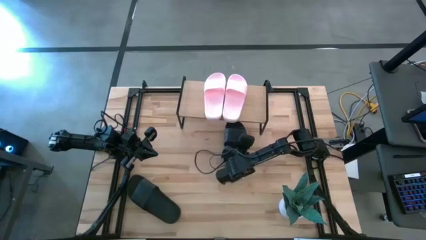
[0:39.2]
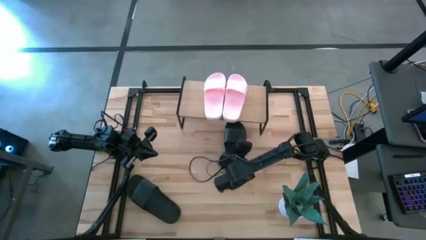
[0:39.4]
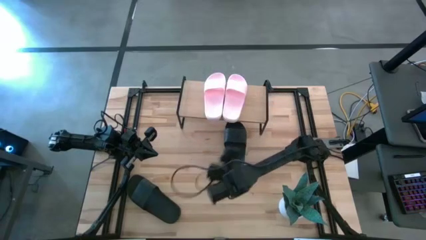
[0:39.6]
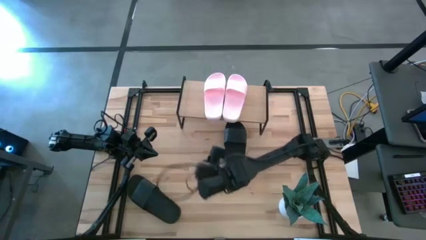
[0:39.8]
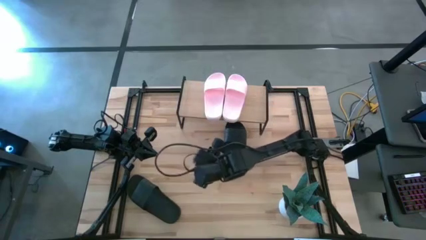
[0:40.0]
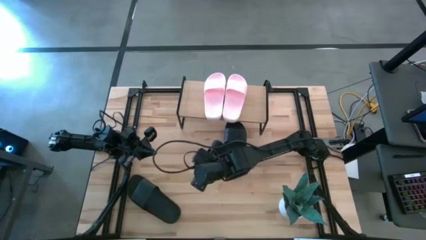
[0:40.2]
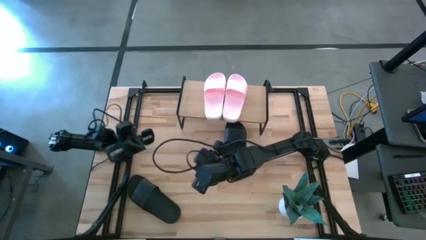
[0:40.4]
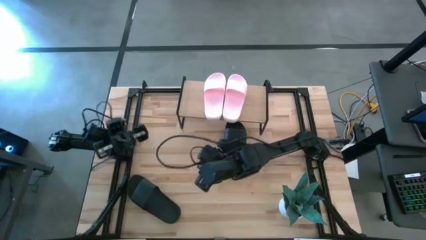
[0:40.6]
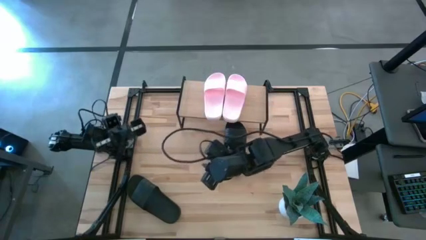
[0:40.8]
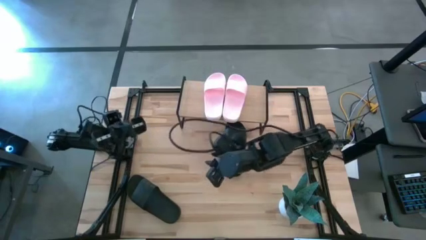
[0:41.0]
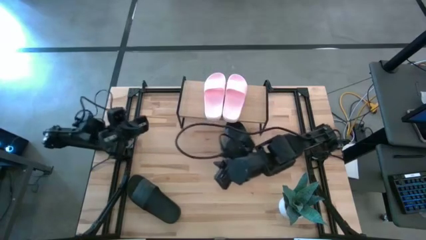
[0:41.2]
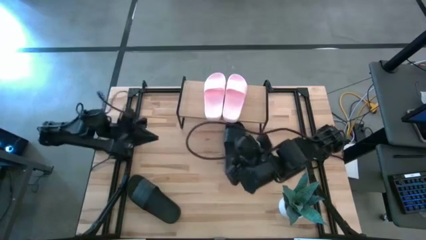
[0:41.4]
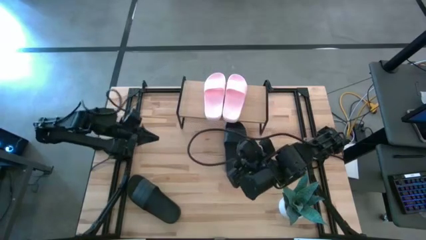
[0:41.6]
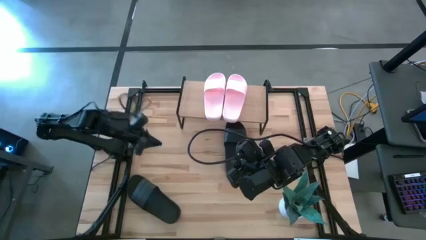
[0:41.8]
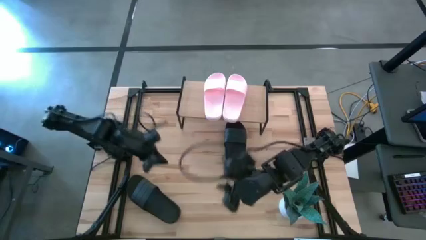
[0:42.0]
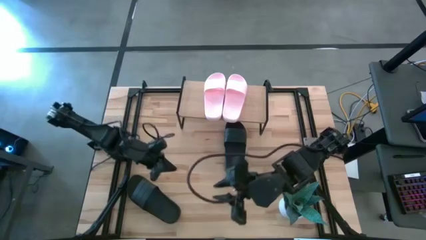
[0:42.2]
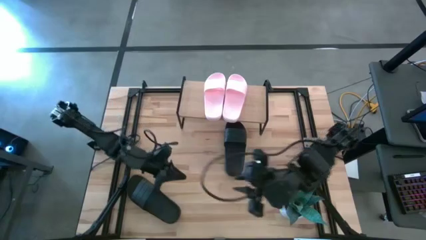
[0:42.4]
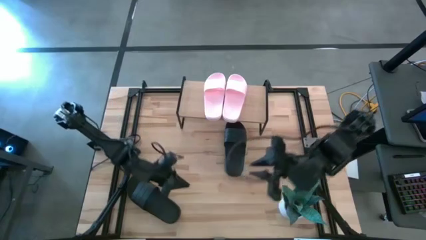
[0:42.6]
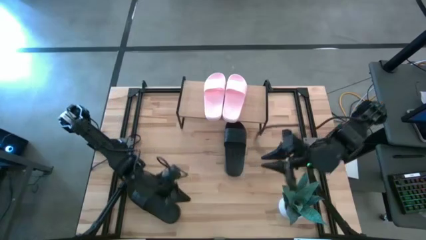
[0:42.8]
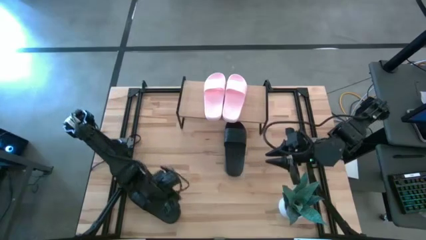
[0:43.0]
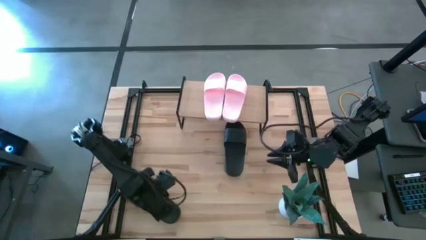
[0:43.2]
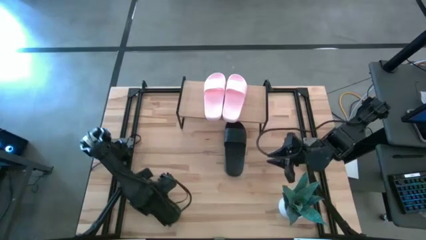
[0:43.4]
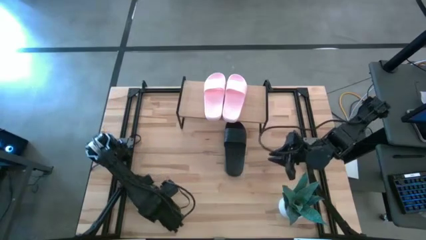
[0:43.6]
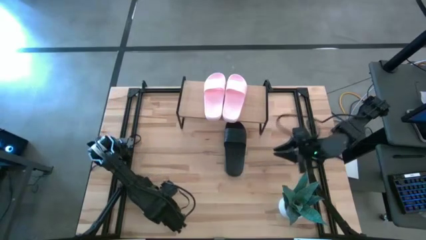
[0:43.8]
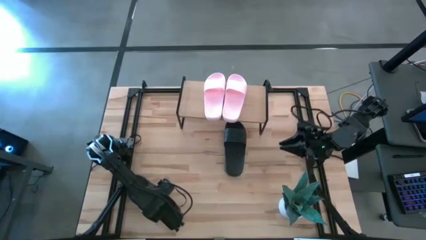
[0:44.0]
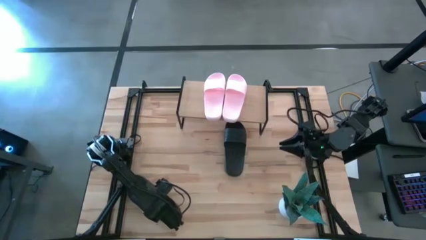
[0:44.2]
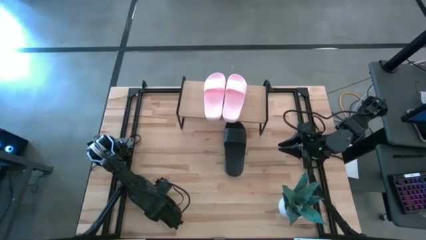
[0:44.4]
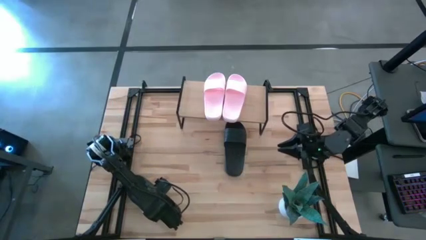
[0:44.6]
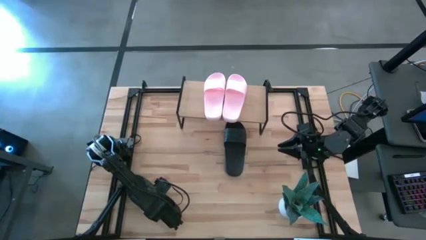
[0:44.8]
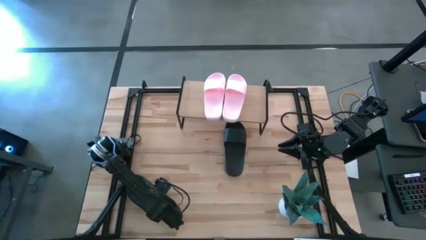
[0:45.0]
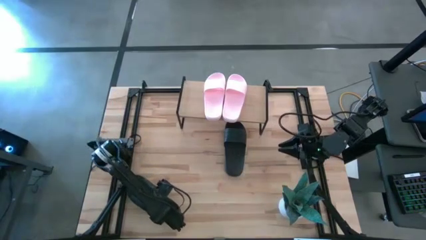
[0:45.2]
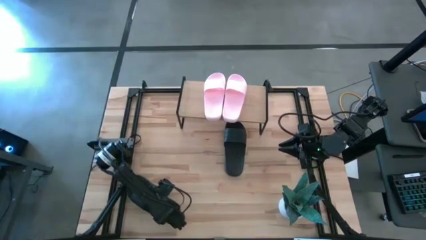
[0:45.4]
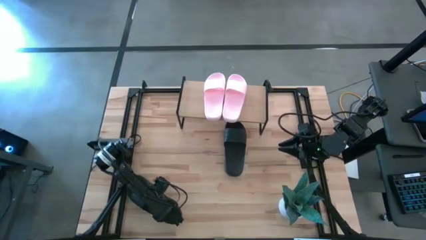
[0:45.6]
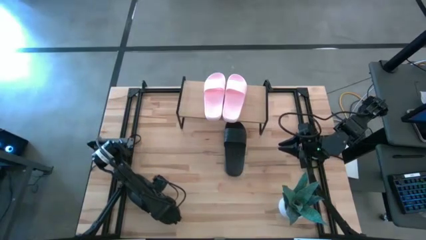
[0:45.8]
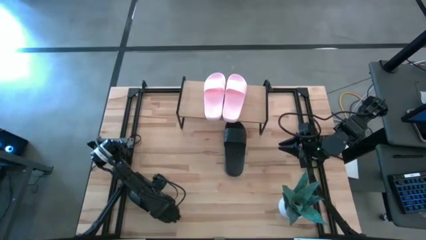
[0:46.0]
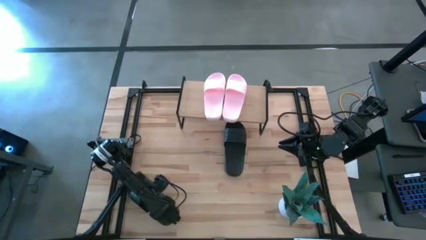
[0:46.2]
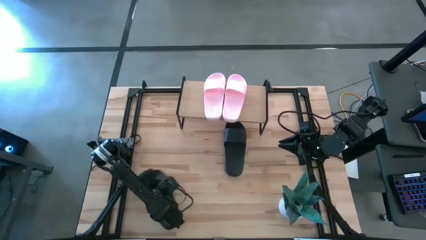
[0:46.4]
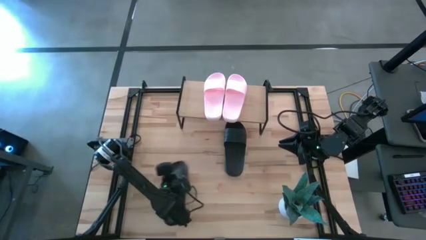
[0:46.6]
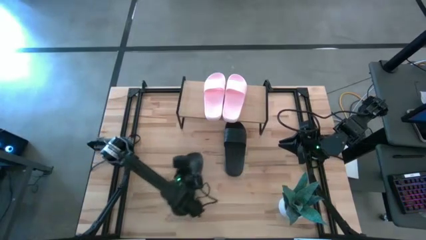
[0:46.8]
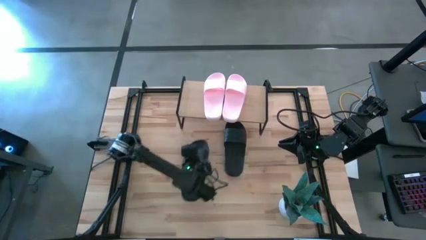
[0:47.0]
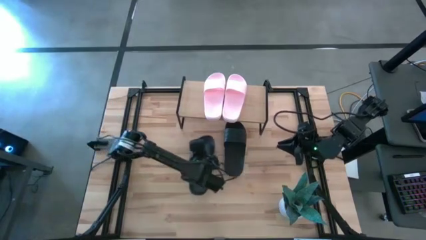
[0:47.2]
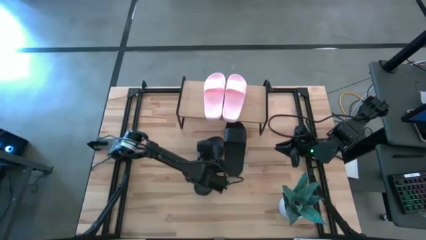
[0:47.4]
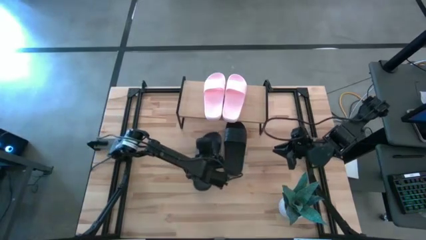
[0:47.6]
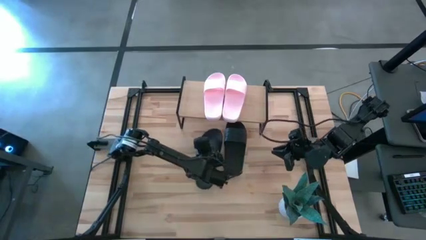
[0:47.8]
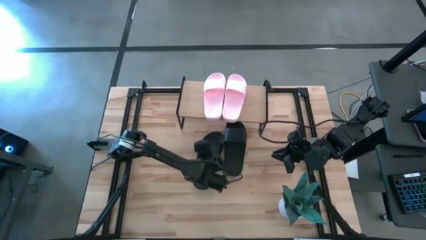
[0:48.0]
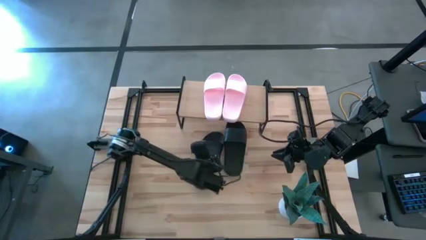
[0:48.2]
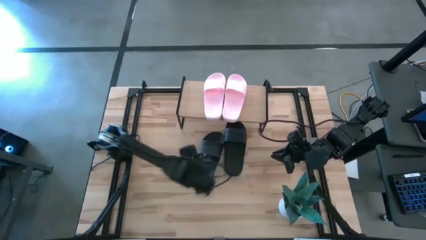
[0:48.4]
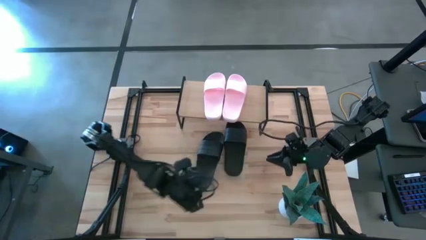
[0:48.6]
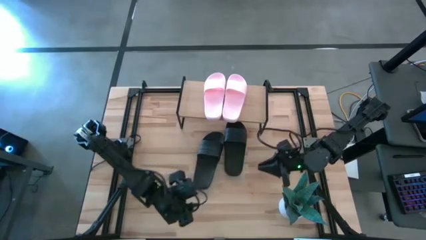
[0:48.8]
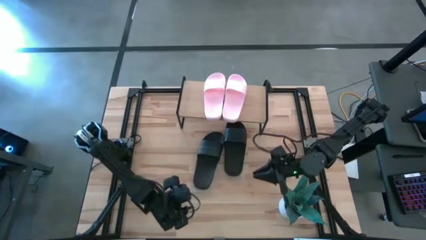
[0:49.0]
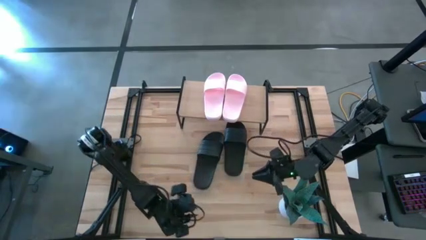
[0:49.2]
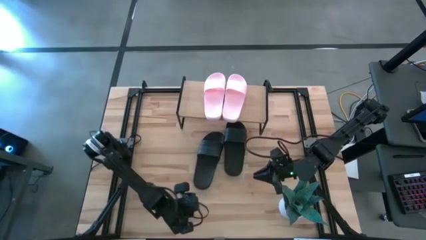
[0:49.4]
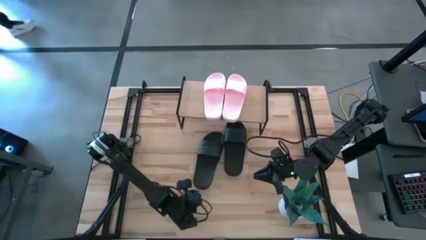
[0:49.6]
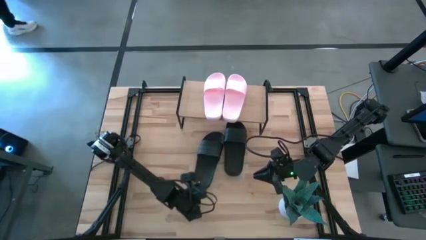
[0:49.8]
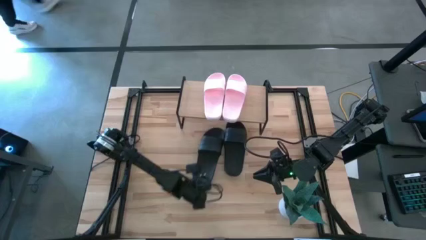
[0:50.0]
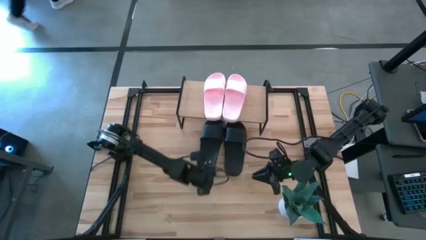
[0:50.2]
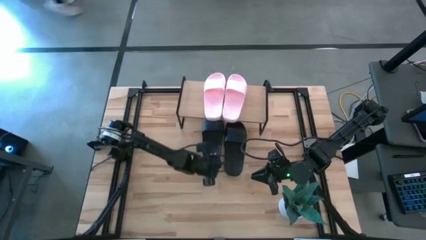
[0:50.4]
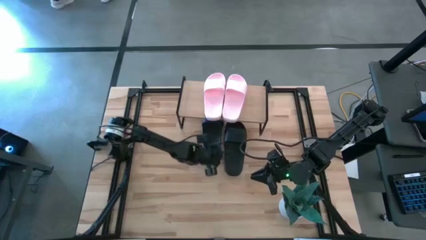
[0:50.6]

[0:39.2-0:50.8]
Task: Pick and place slides into the shelf
Put the left black slide under the shelf

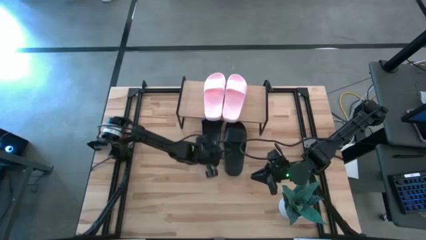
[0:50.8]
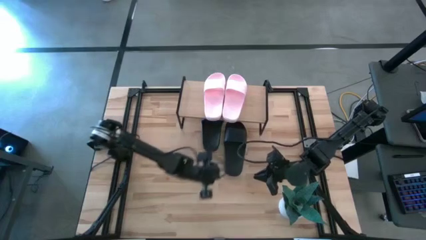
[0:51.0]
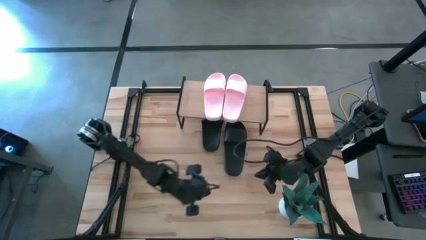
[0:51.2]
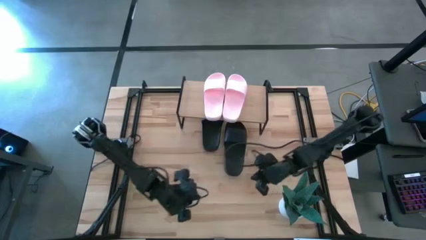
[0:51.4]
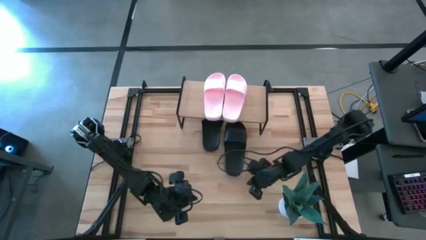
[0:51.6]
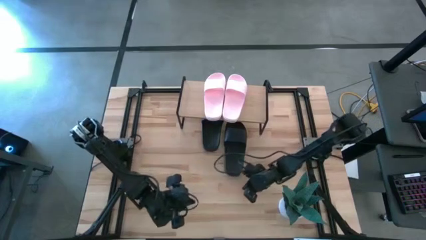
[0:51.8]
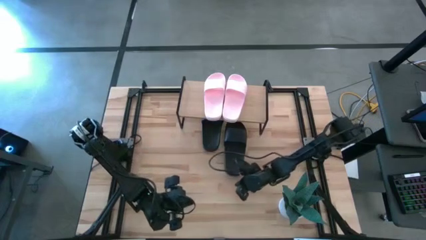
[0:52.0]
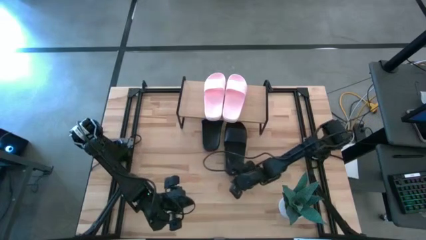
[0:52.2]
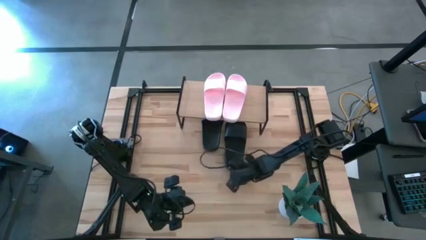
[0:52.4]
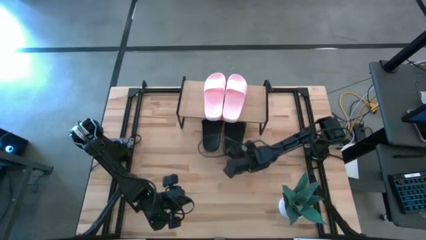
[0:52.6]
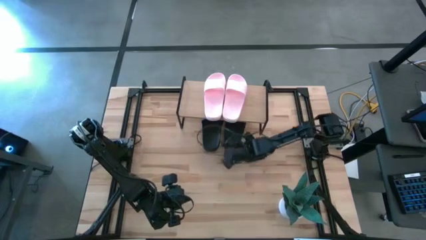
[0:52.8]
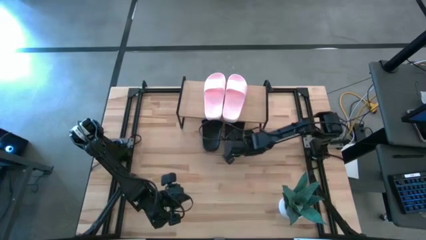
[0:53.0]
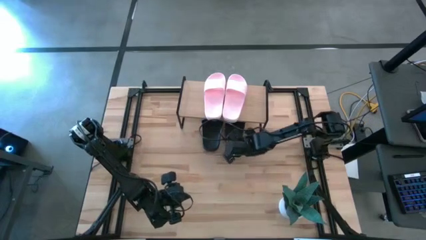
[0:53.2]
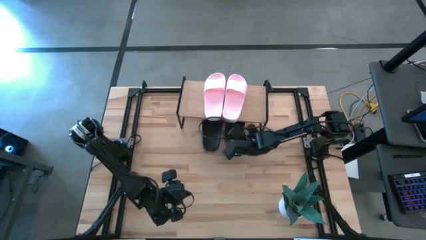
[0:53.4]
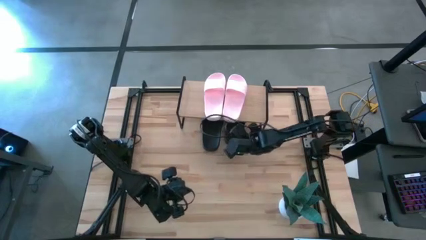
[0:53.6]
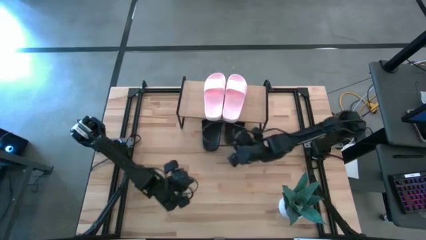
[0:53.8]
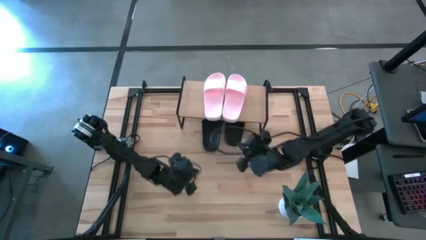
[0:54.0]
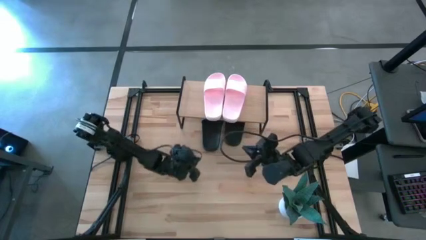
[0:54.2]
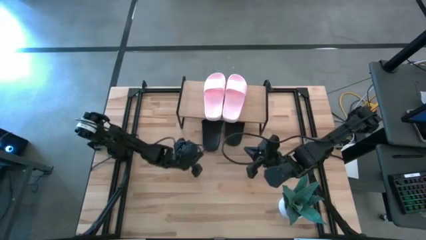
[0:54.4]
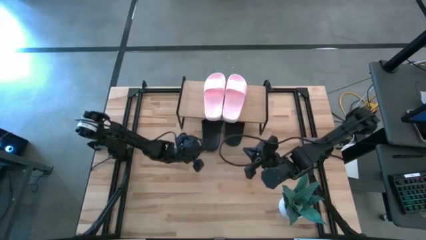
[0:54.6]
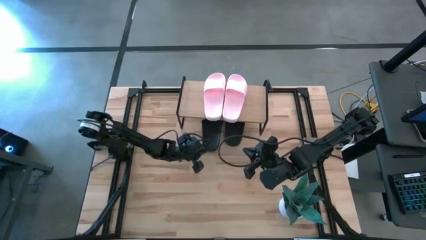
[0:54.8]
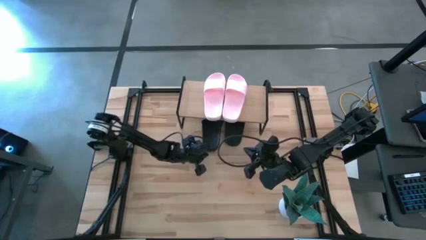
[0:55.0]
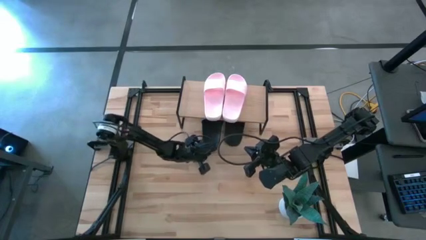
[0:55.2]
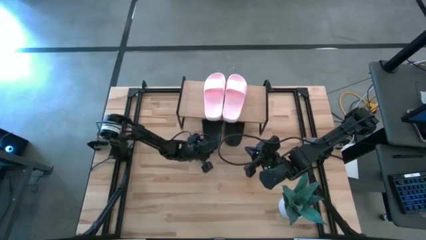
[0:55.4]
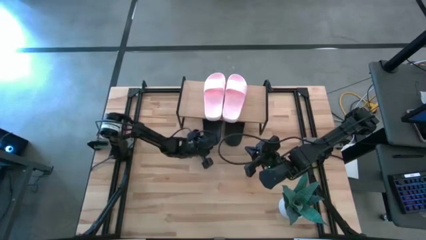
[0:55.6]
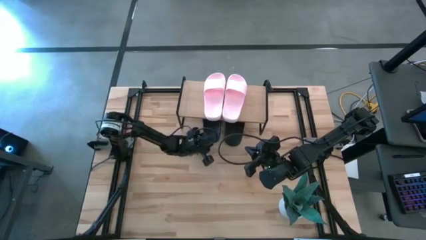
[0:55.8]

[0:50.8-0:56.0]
Adjust the black slides under the shelf
